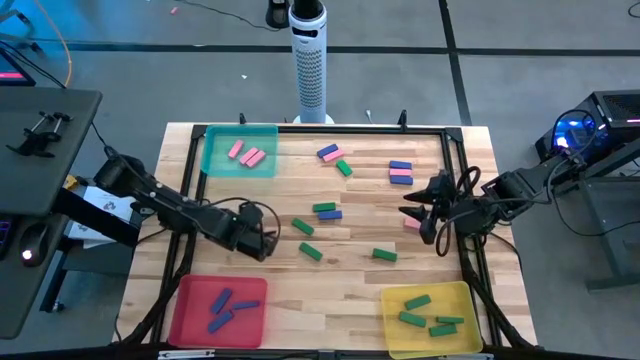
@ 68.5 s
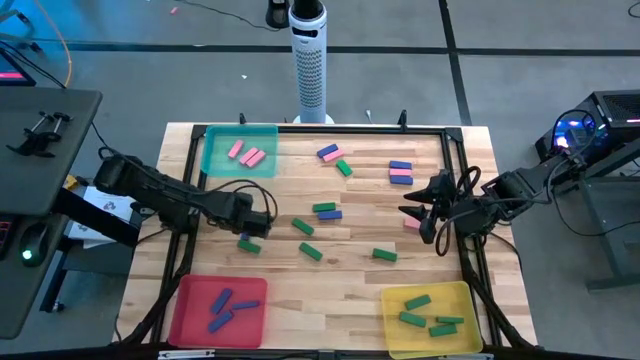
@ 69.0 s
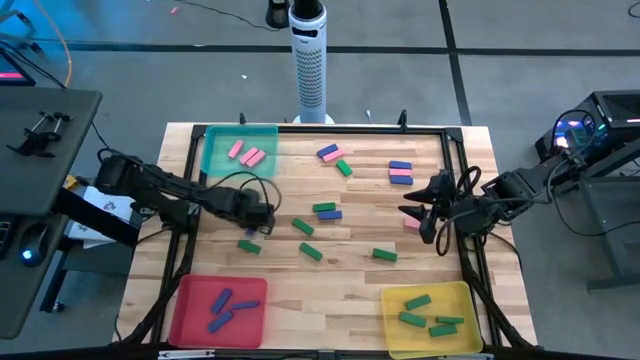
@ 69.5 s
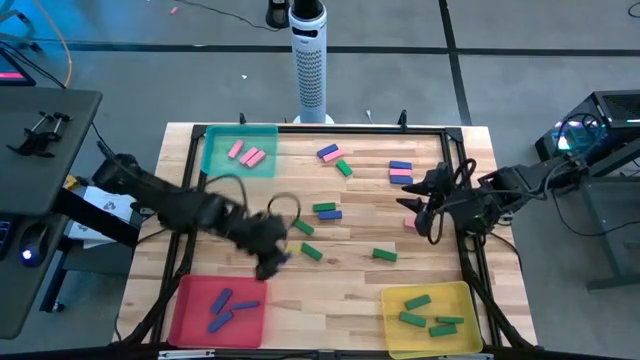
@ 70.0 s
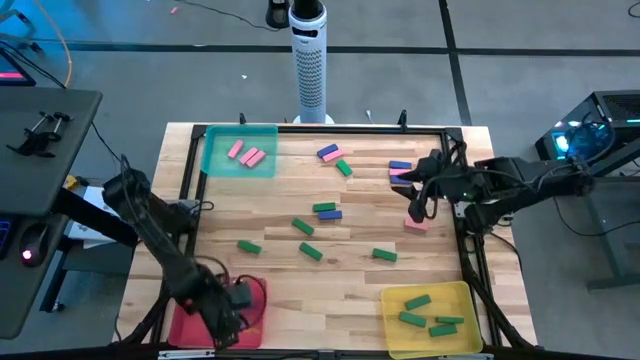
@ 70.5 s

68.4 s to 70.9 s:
Task: Sort blocks
Put the blue block into the red bin

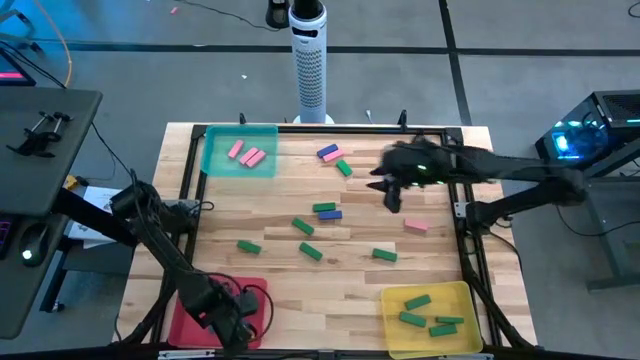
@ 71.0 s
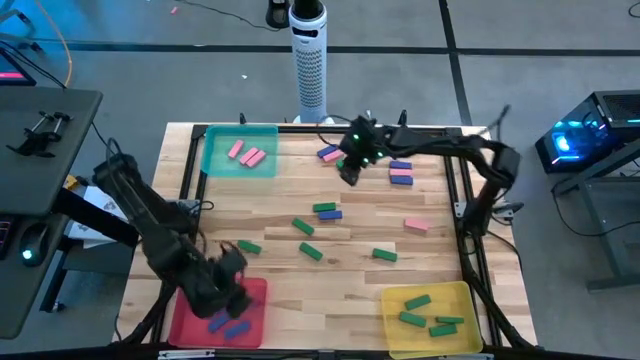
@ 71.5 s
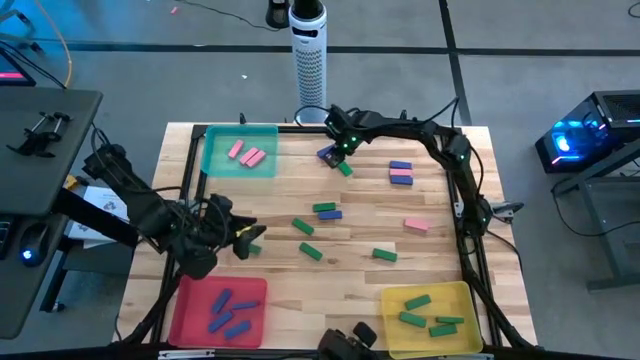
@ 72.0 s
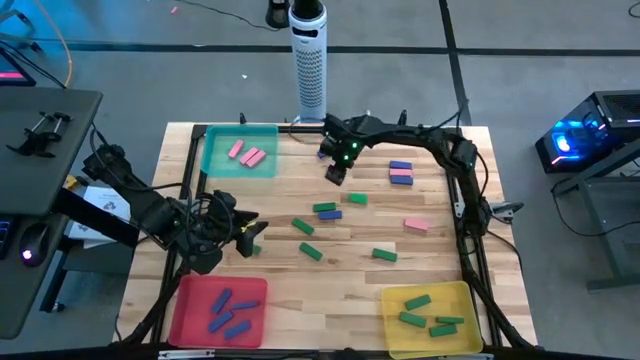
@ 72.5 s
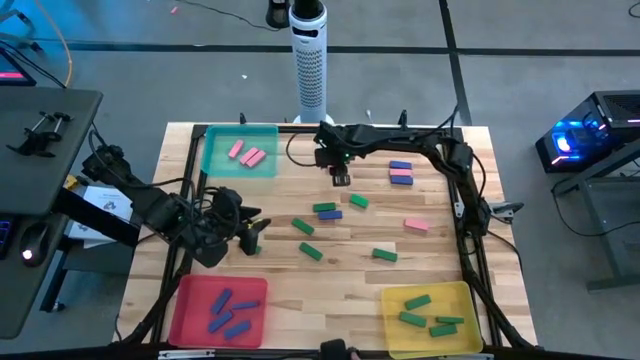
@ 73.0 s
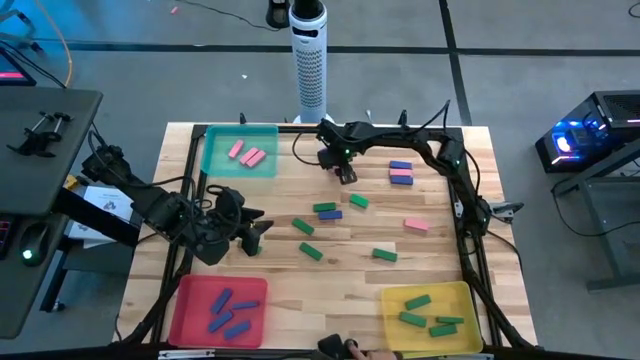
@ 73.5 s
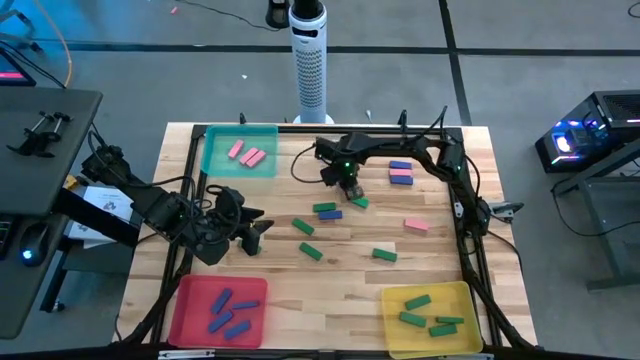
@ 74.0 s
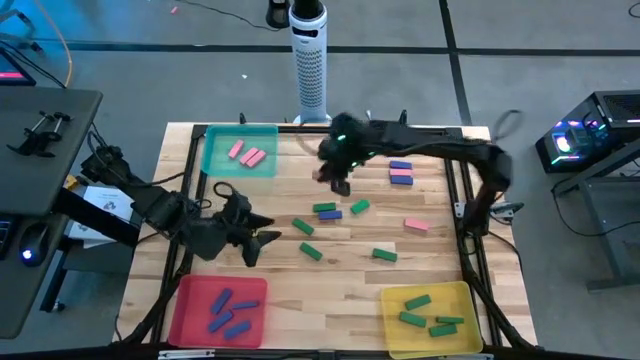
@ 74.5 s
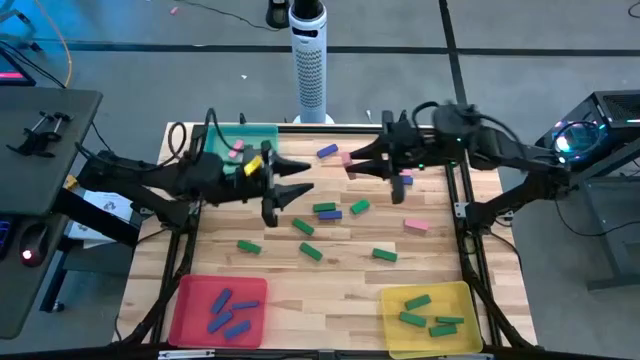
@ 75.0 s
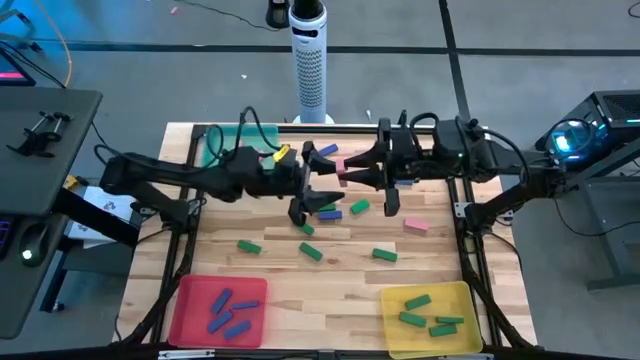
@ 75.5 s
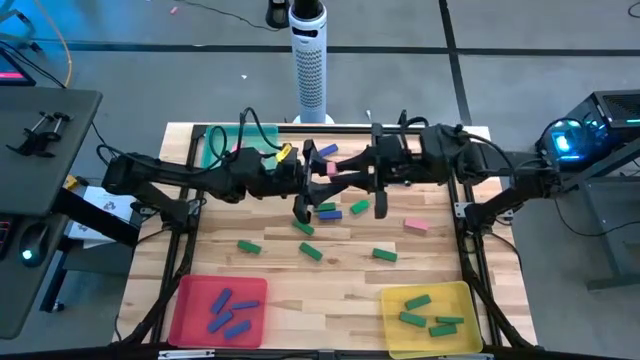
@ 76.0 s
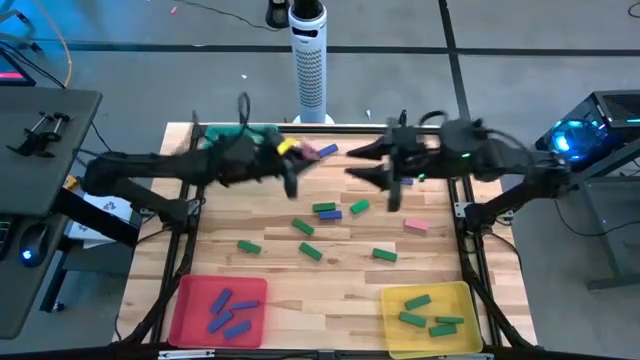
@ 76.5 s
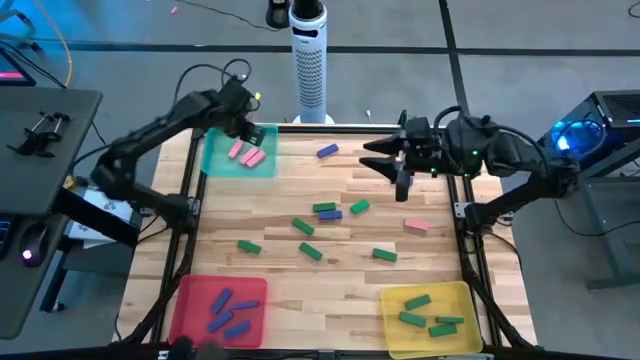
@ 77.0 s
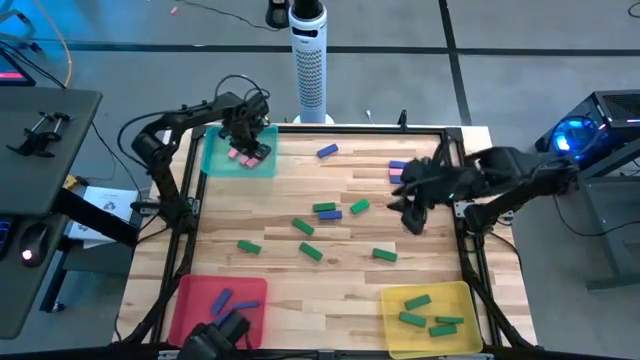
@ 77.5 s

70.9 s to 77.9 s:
Put the pink block into the green bin

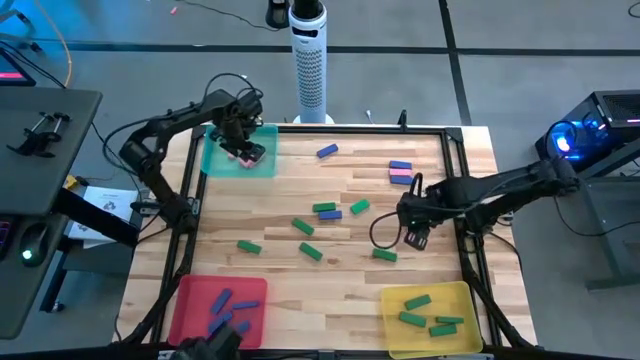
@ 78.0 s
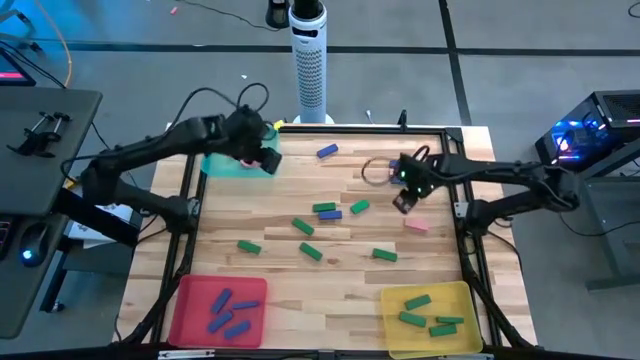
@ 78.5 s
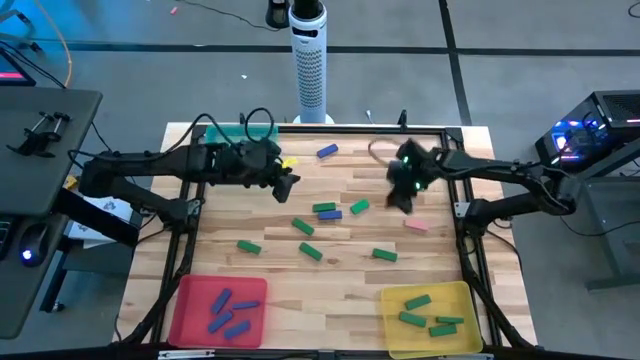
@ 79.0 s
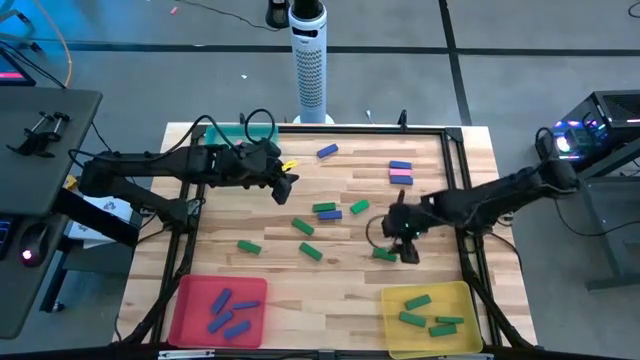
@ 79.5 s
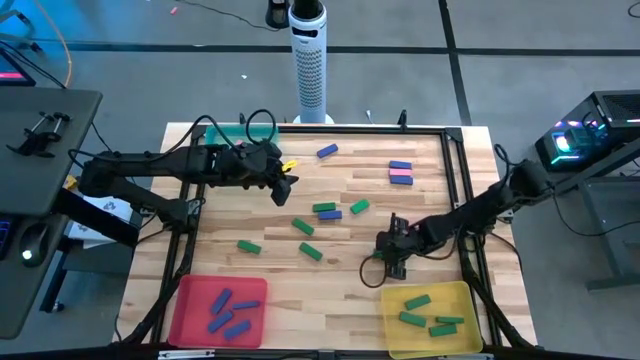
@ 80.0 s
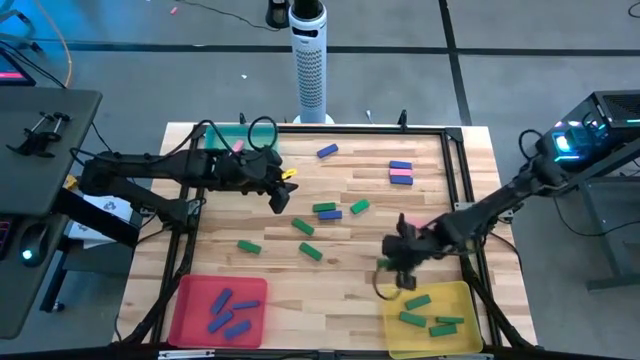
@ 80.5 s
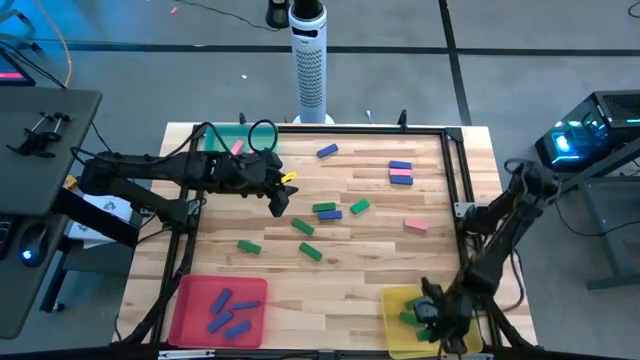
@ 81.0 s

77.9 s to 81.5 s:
Put the green block into the yellow bin

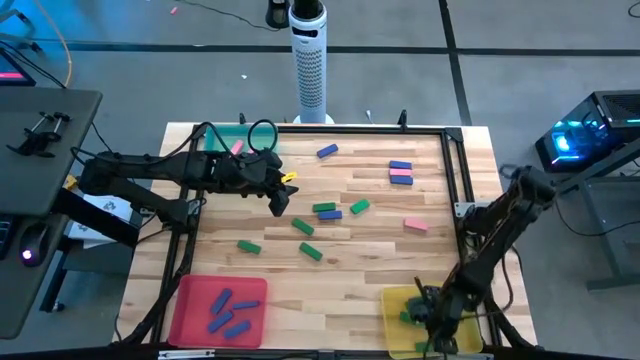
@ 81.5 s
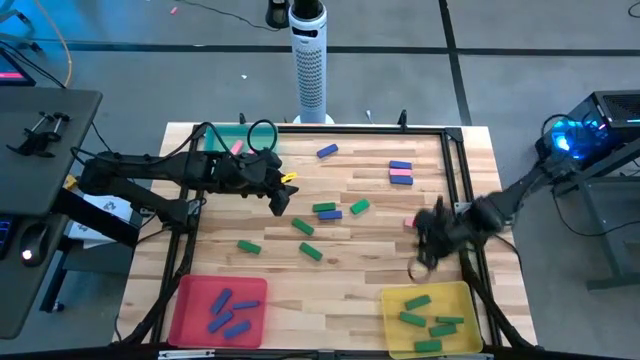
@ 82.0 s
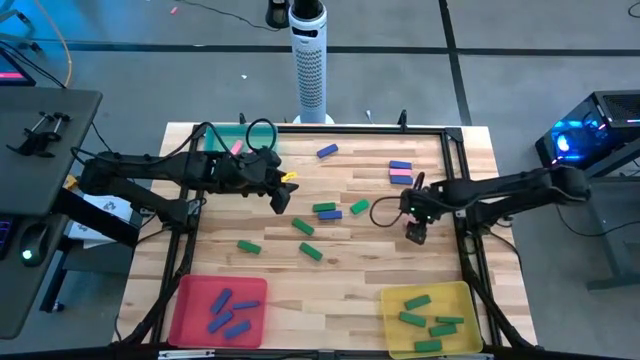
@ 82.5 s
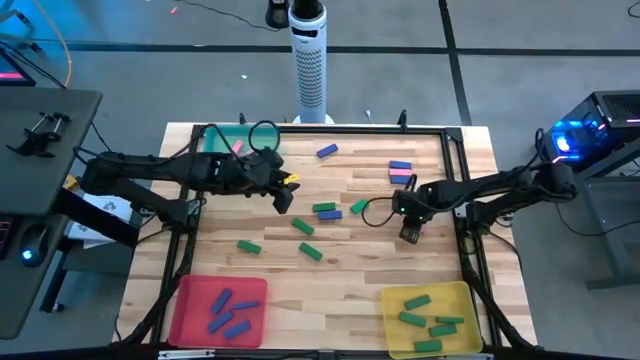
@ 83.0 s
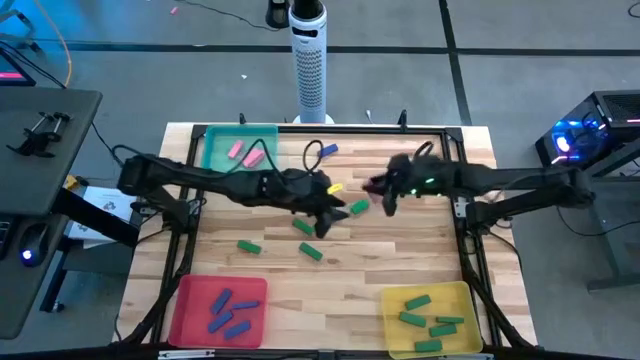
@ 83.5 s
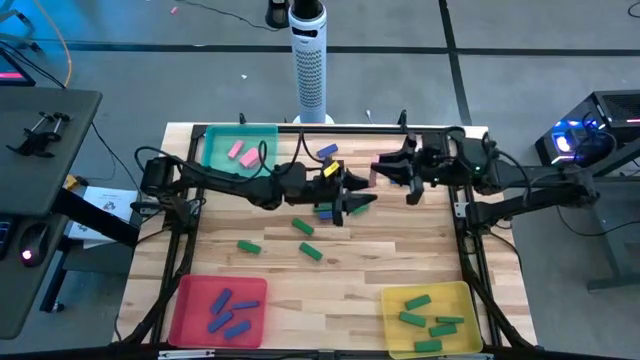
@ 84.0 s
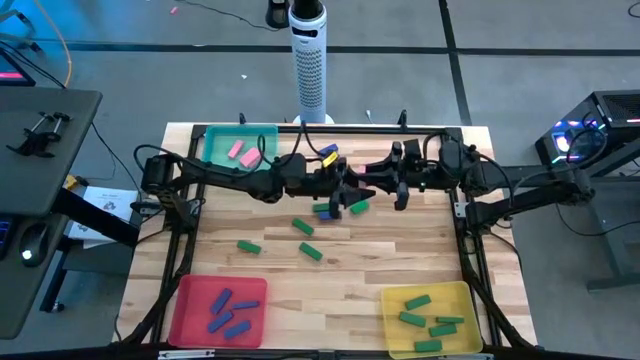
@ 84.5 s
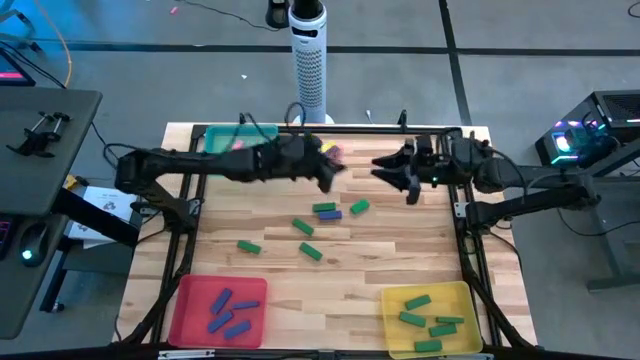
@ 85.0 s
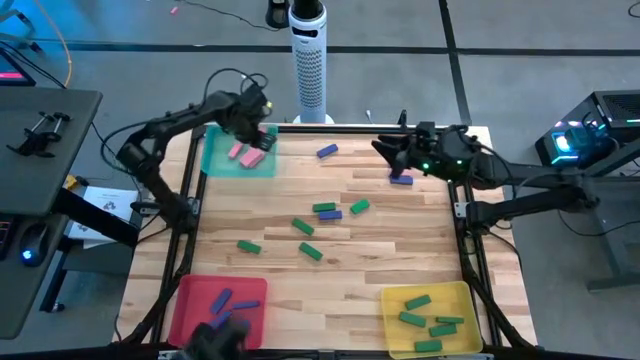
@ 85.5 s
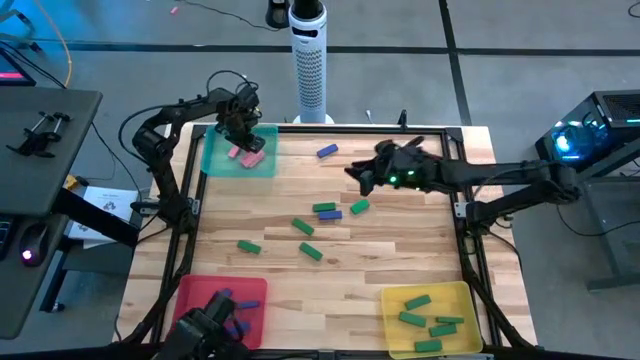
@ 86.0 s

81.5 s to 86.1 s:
Put the pink block into the green bin

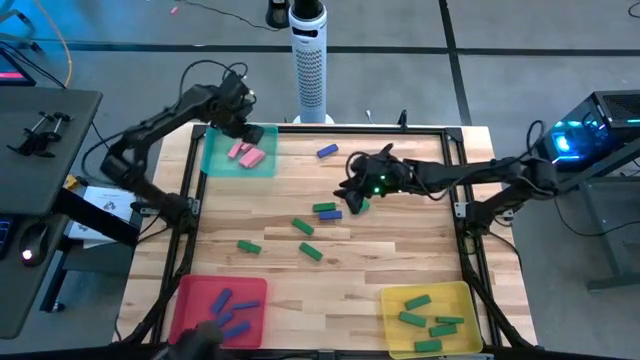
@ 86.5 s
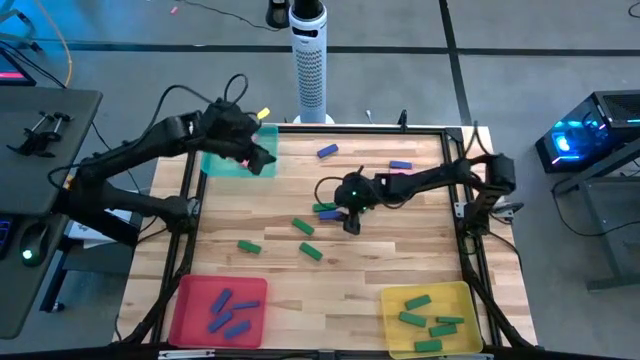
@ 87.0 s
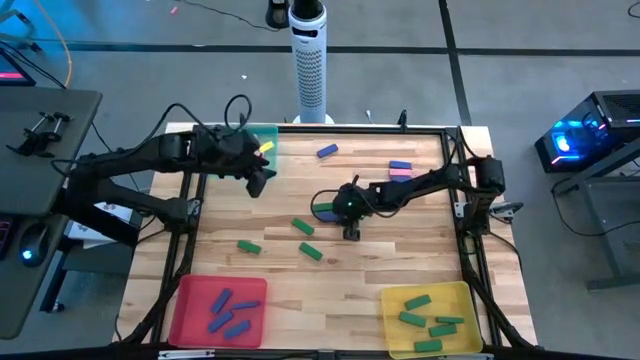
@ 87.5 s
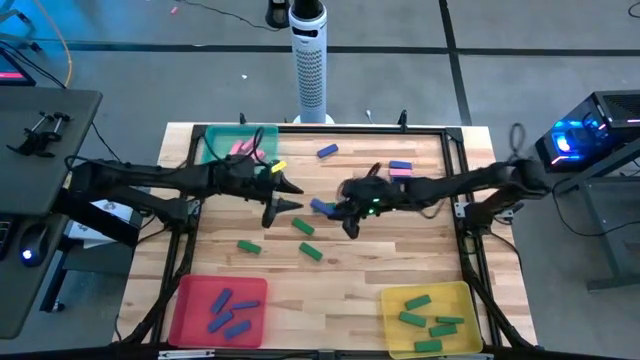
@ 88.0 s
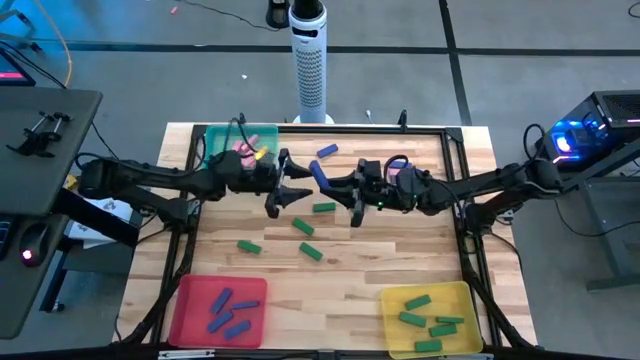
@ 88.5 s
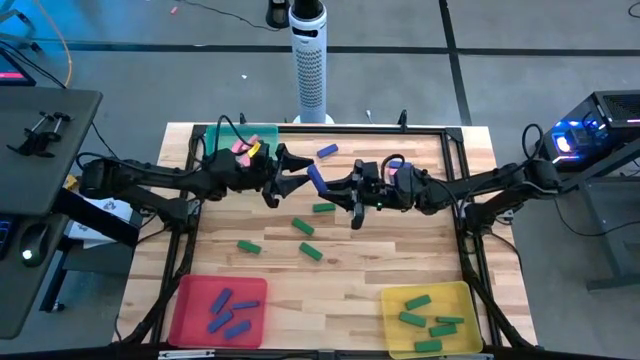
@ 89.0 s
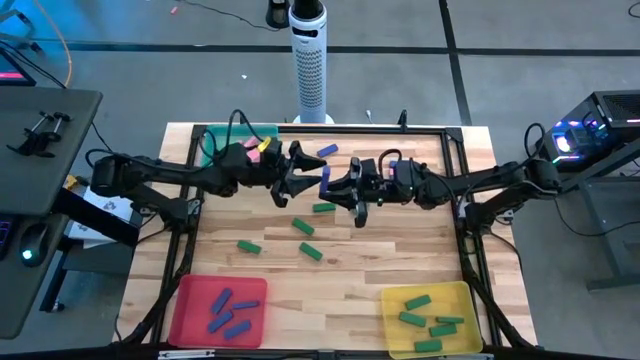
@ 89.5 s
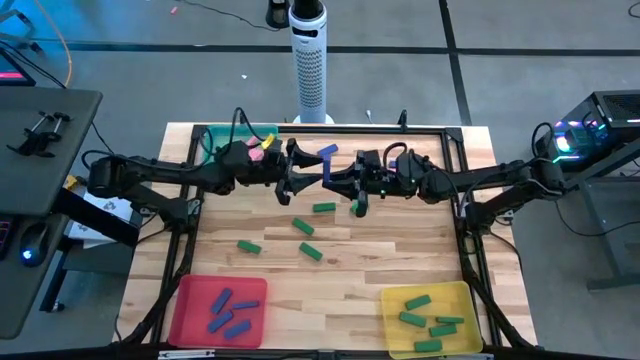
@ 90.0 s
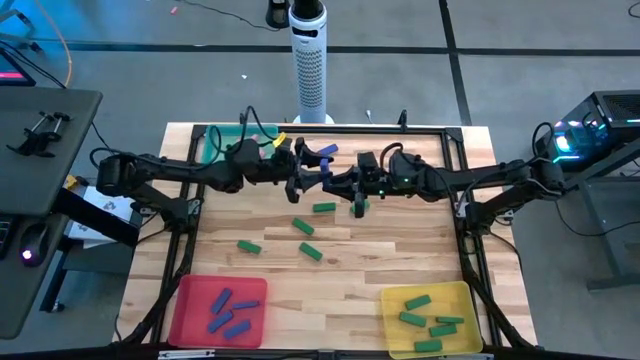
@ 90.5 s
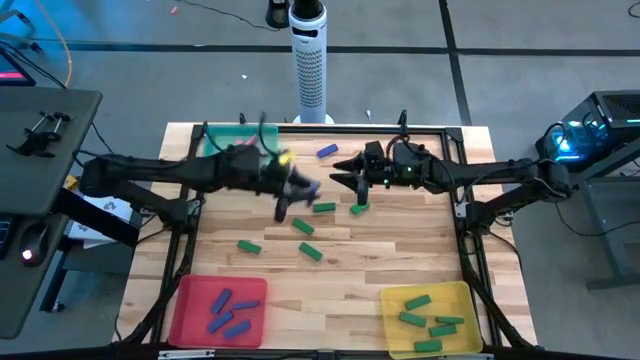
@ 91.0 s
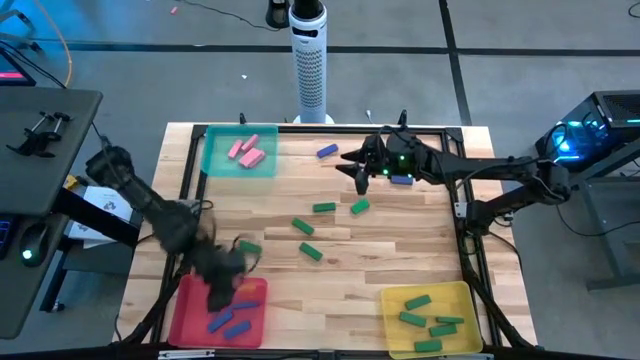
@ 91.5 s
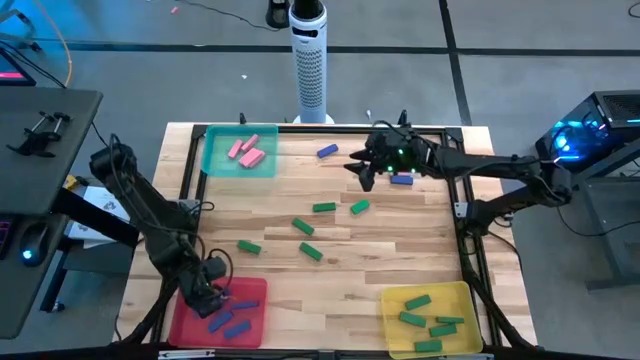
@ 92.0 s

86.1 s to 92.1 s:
Put the blue block into the red bin
